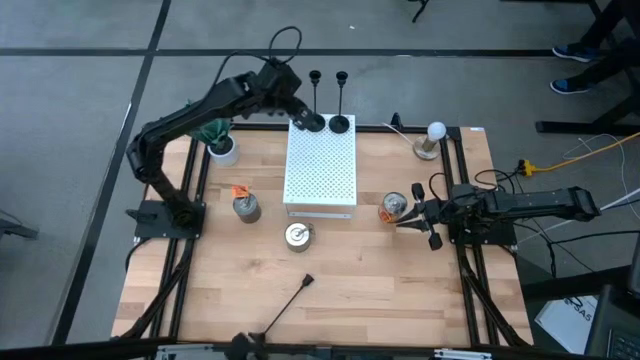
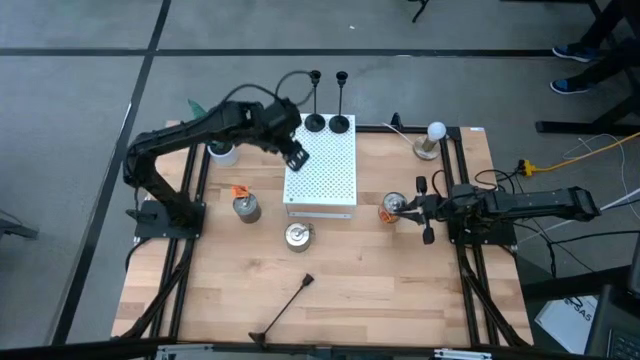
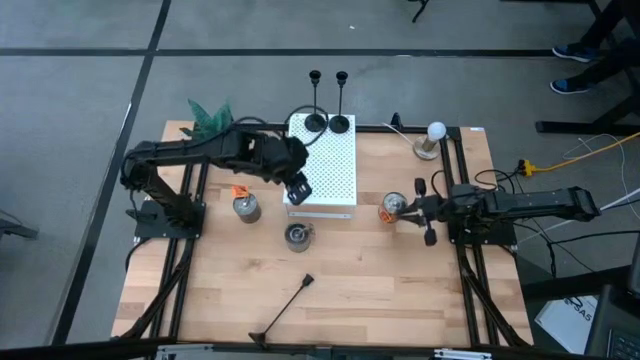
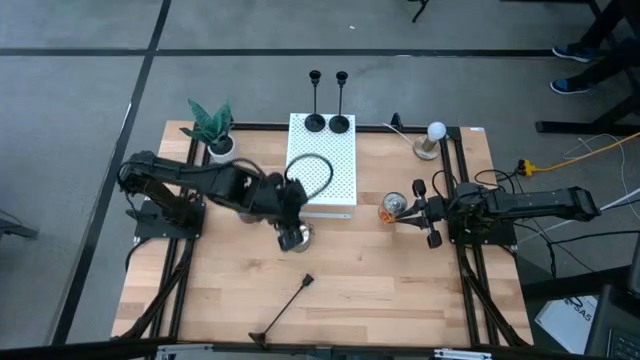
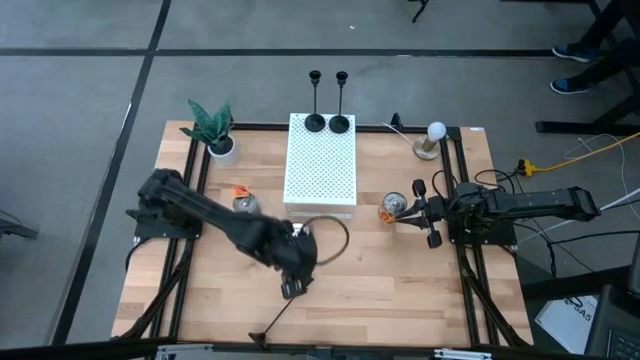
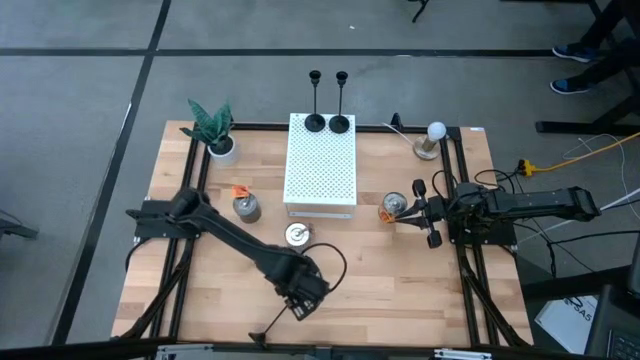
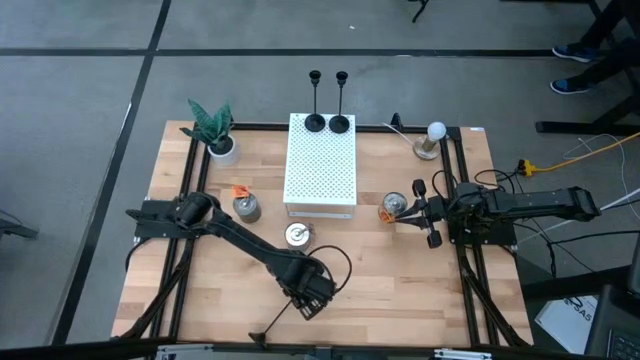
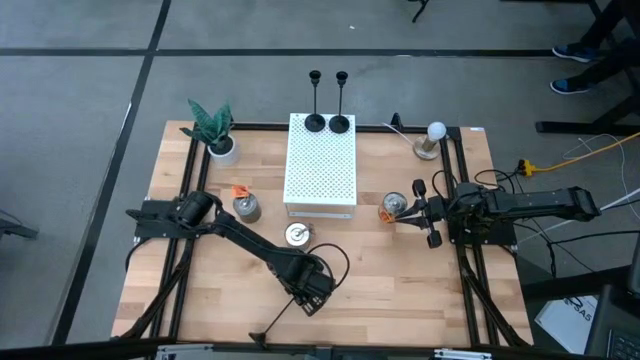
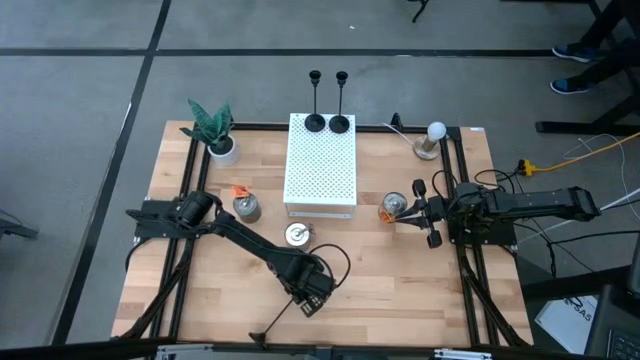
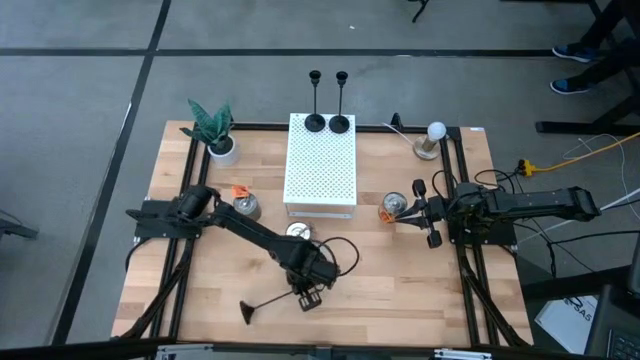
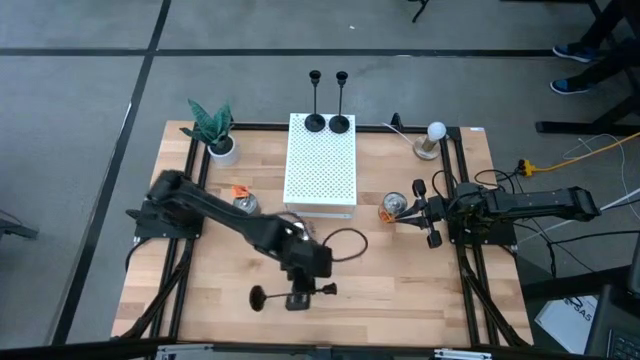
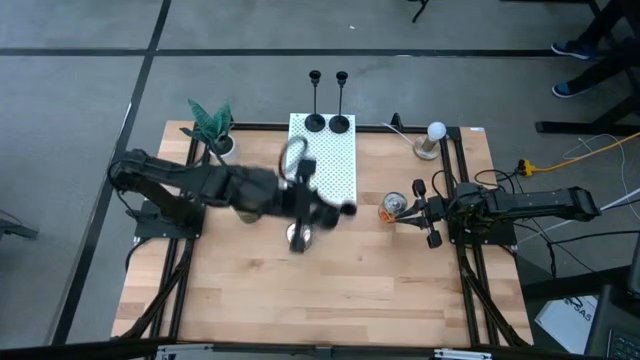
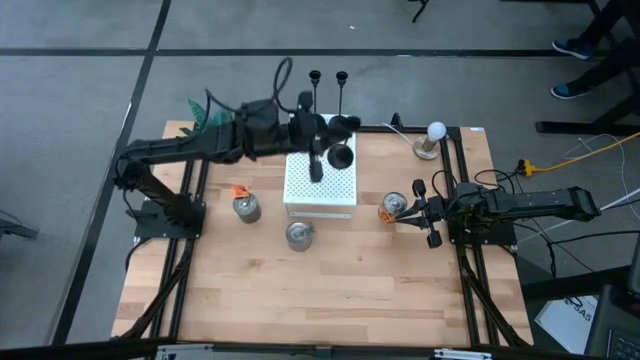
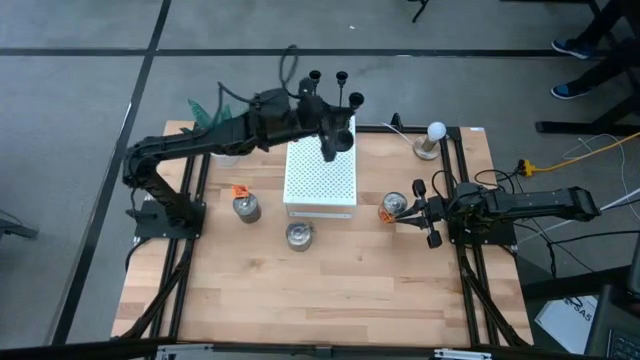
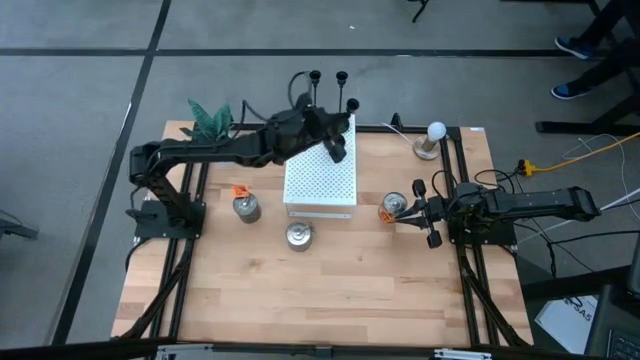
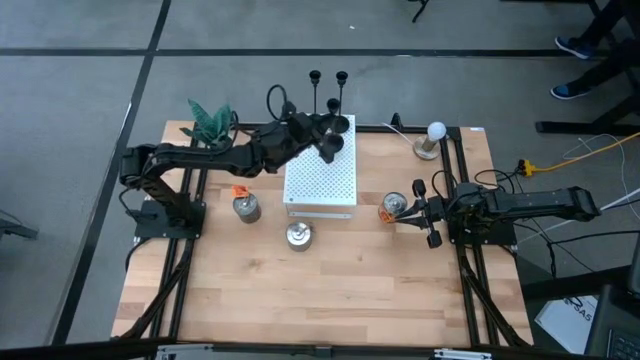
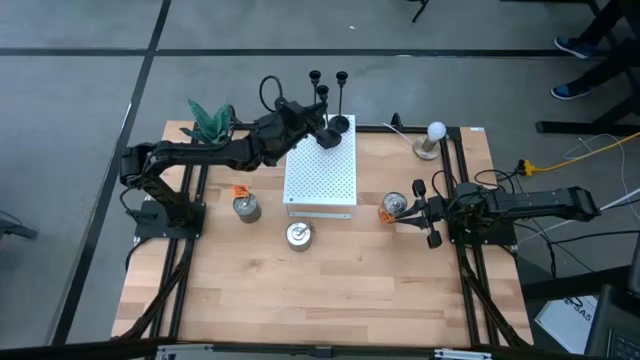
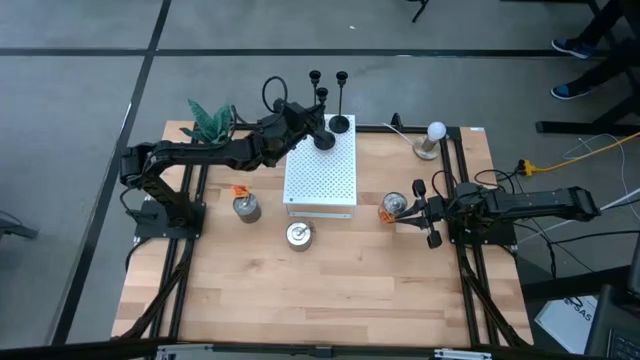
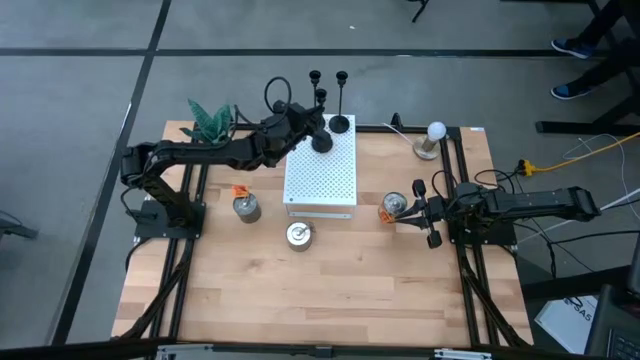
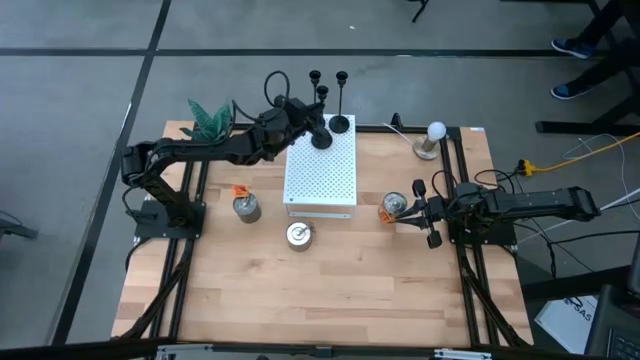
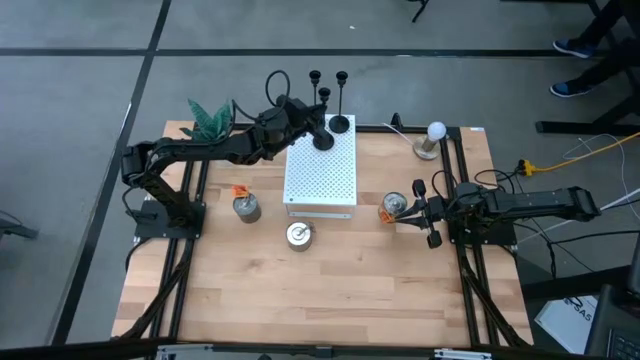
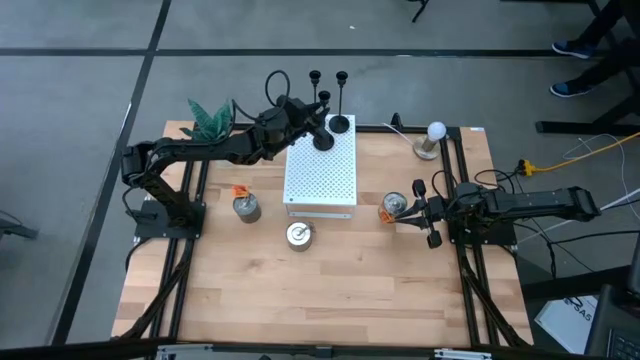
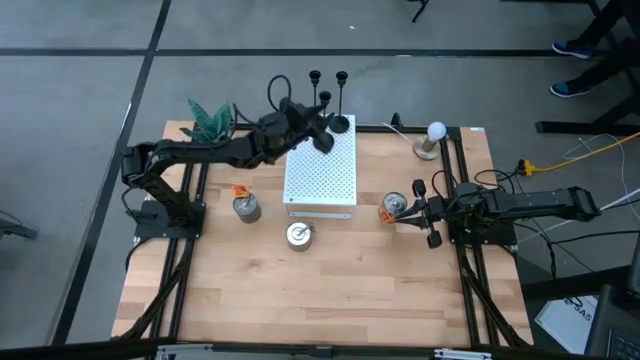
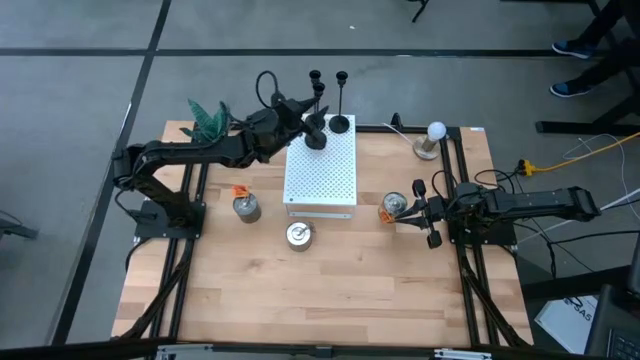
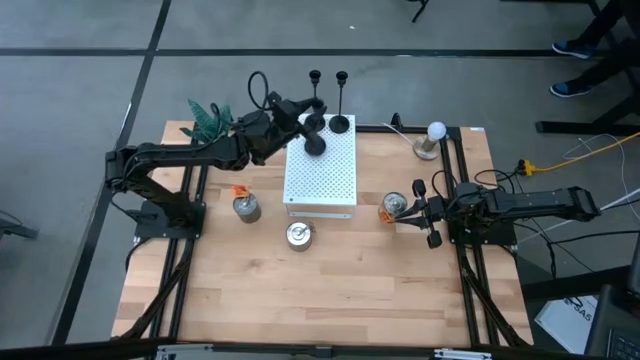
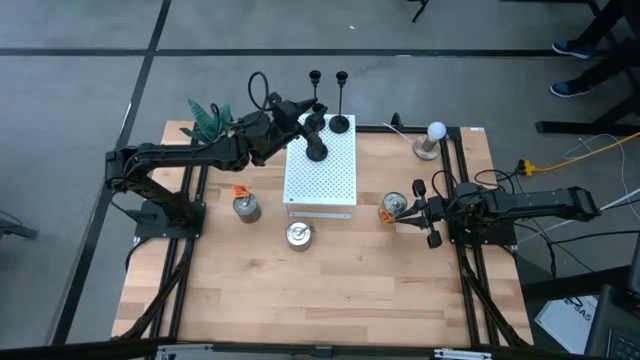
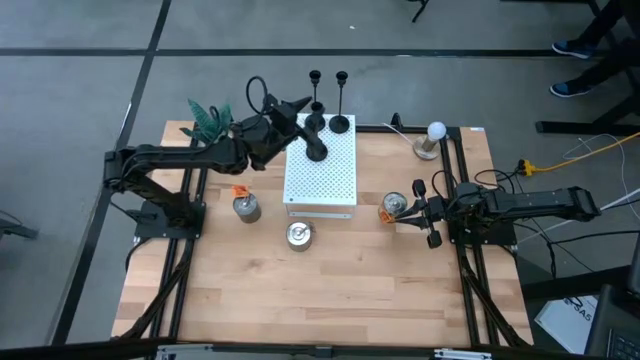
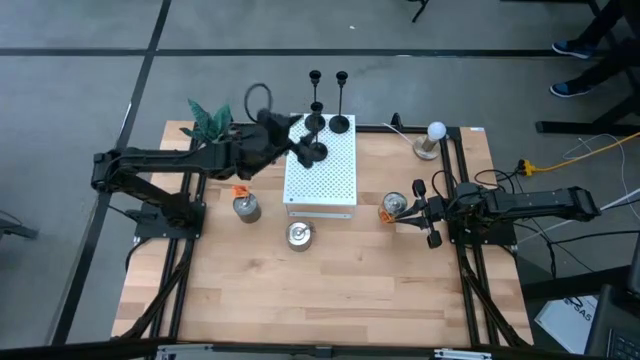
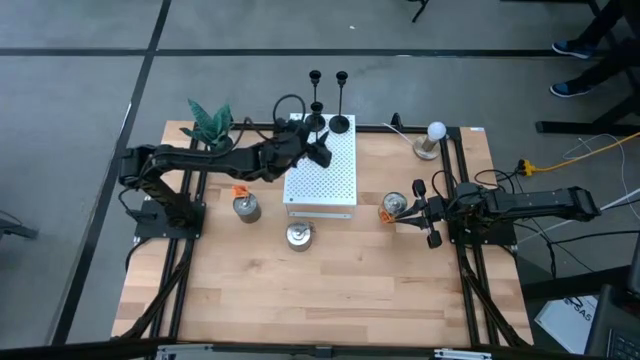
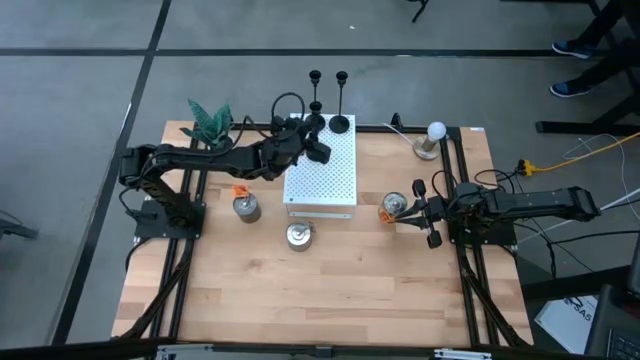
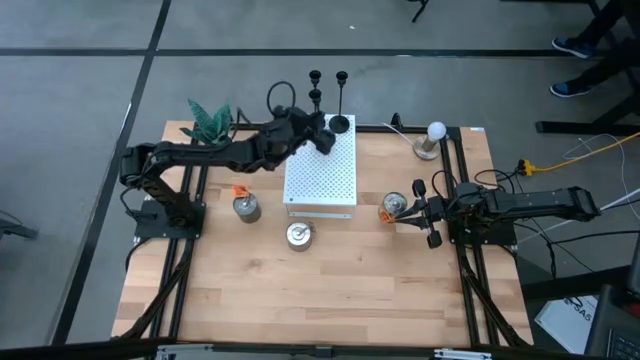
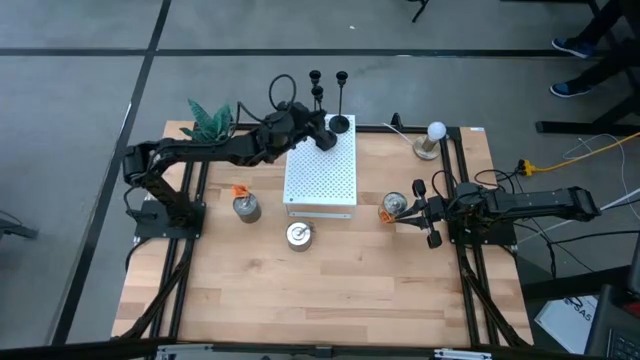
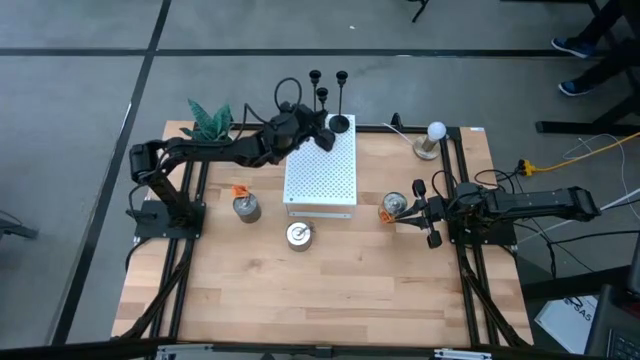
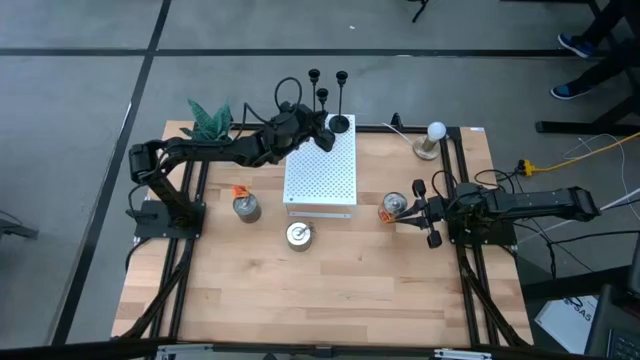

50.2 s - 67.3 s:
Task: Pick & Place candle stick holders
Put the black candle holder on the shelf

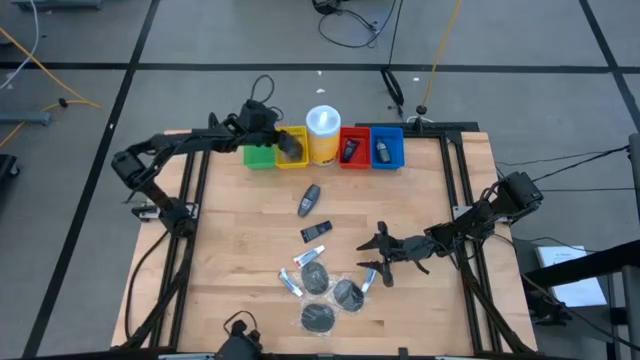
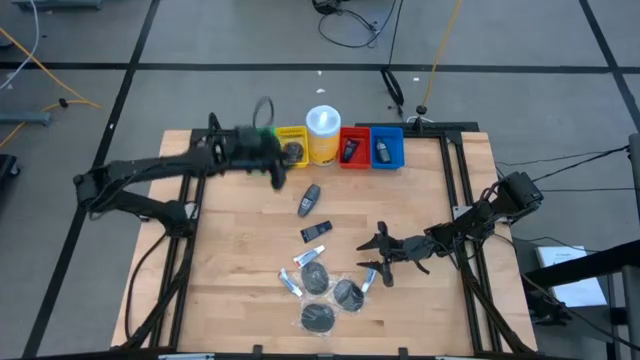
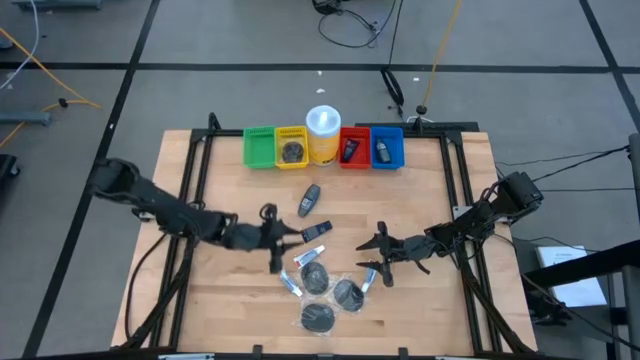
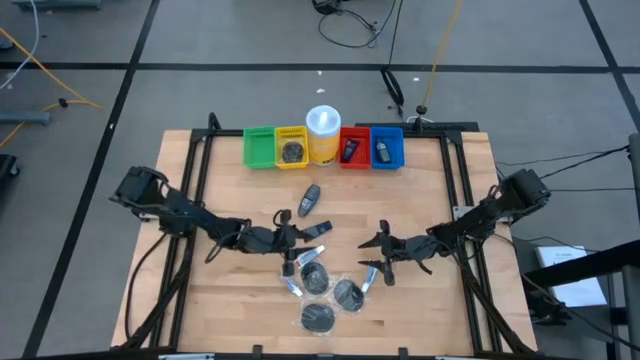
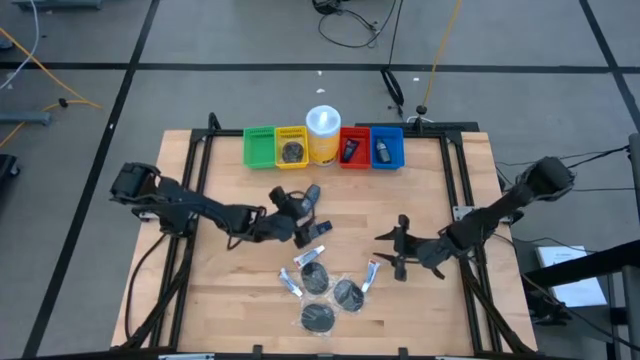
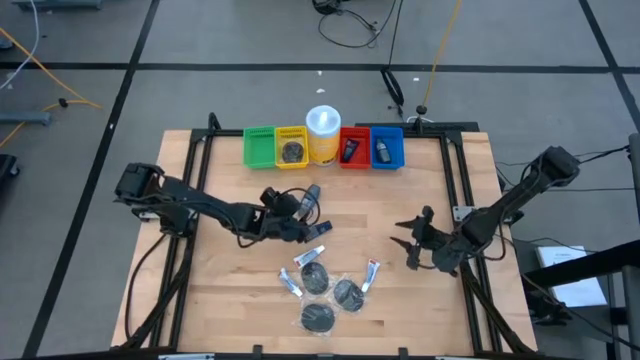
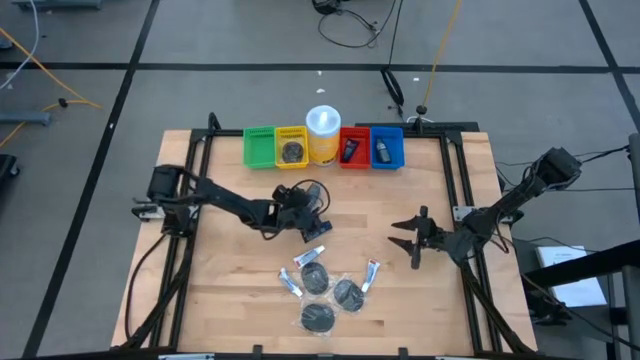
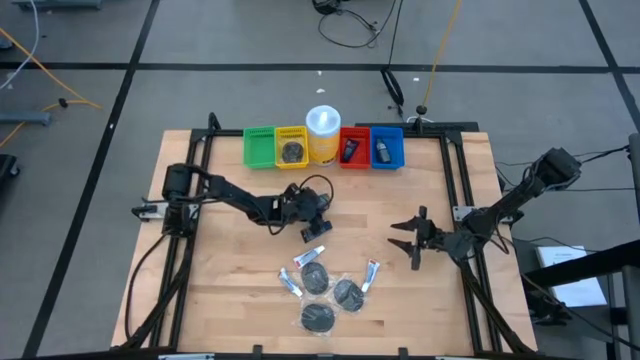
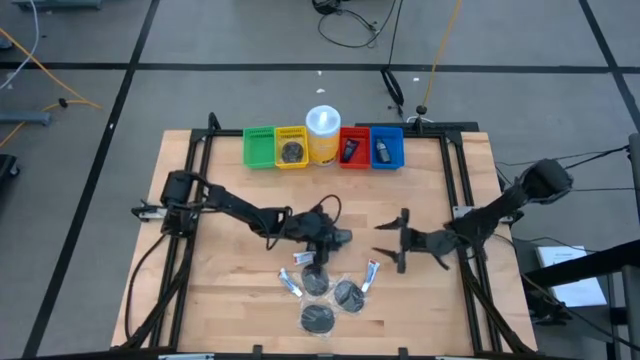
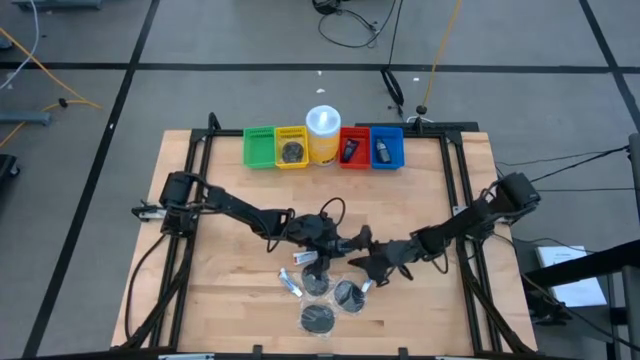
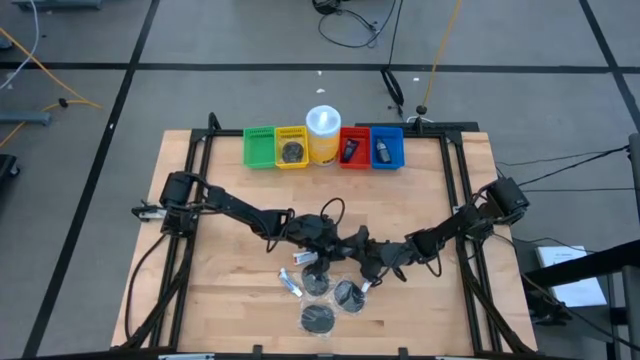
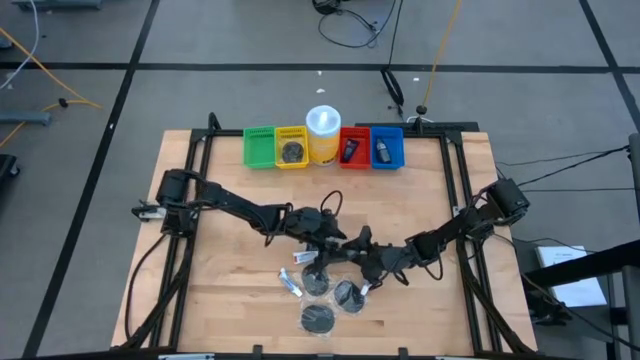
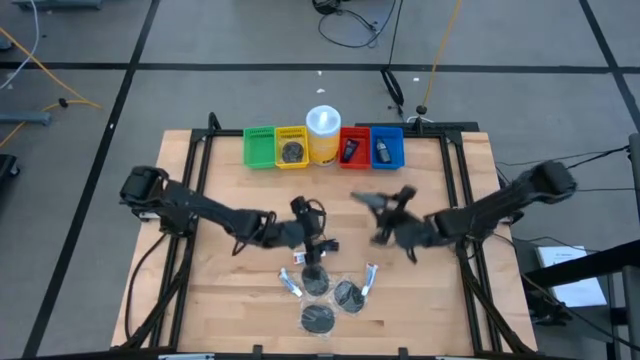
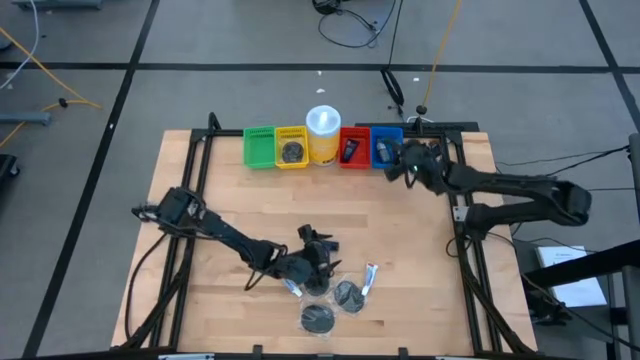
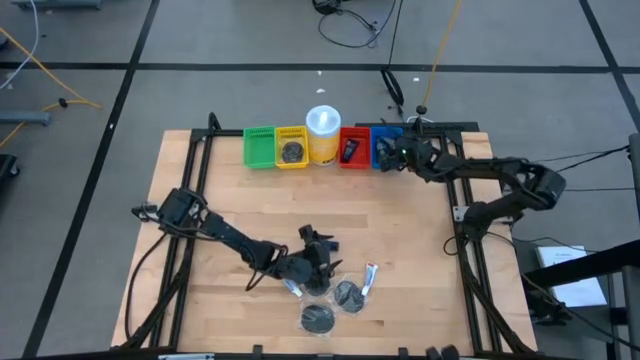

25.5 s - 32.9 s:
Task: Pick & Place Travel size toiletries
Put the black deodorant into the blue basket
